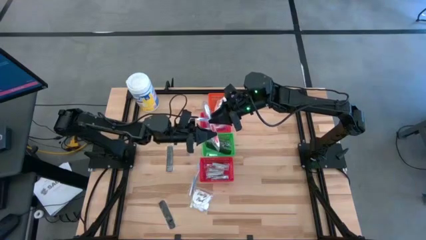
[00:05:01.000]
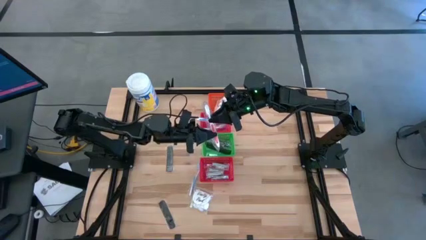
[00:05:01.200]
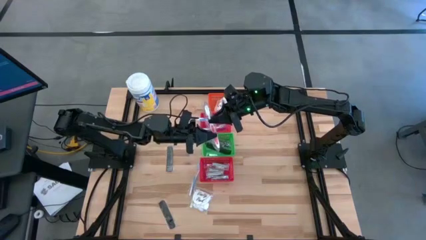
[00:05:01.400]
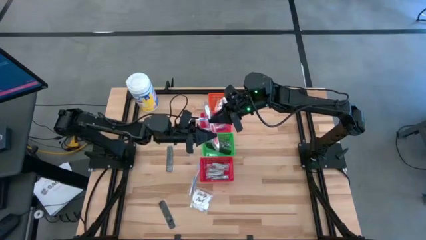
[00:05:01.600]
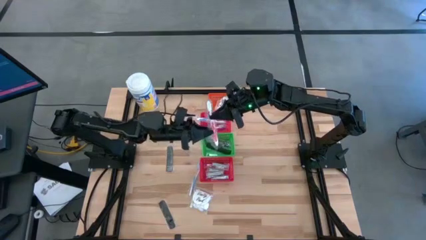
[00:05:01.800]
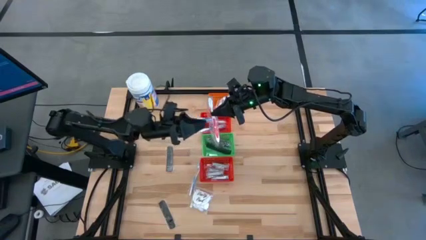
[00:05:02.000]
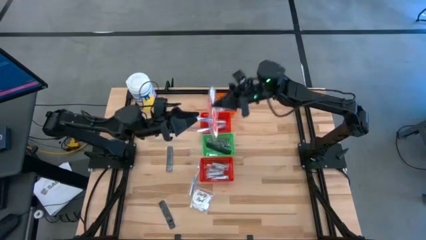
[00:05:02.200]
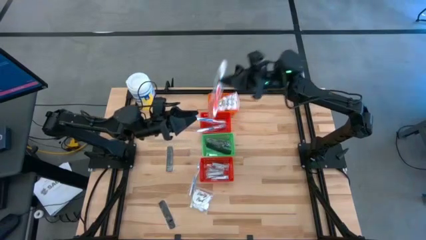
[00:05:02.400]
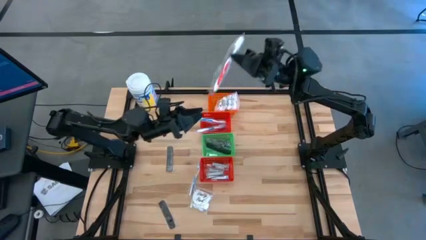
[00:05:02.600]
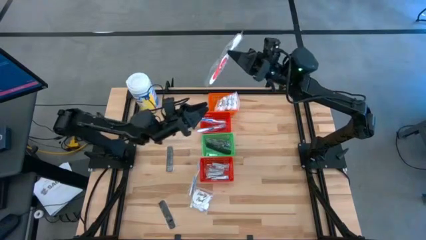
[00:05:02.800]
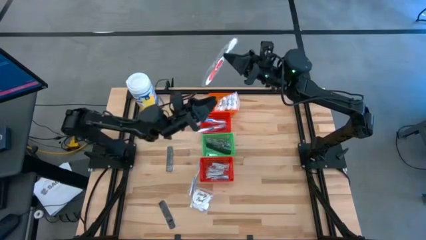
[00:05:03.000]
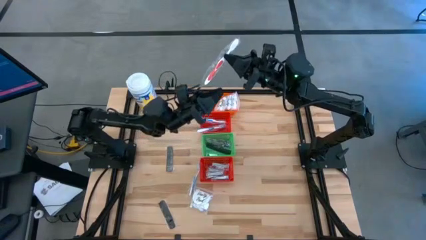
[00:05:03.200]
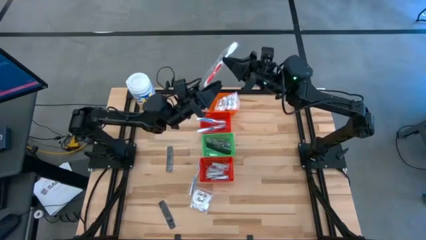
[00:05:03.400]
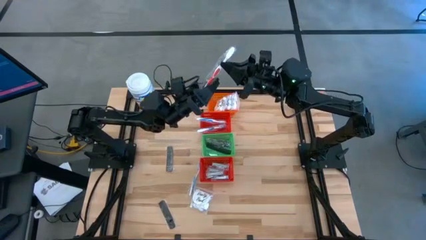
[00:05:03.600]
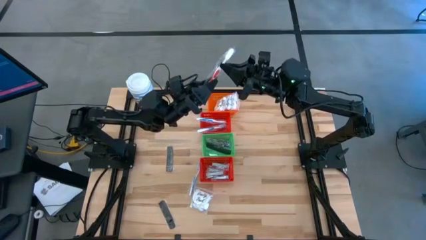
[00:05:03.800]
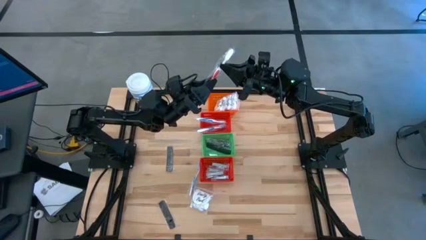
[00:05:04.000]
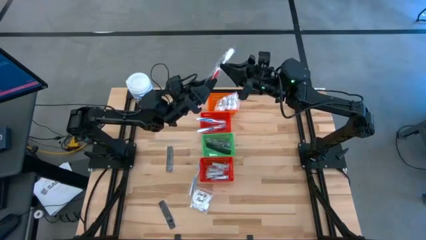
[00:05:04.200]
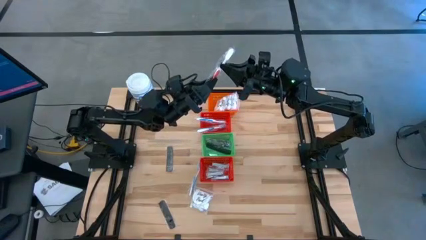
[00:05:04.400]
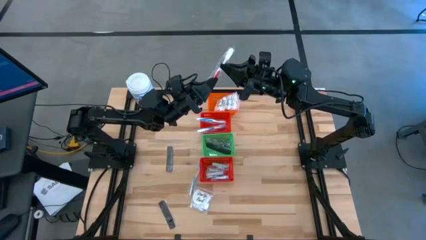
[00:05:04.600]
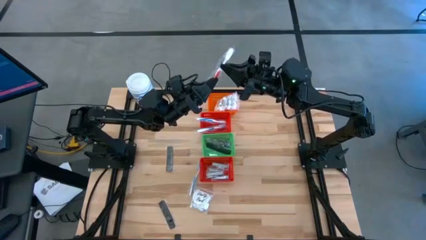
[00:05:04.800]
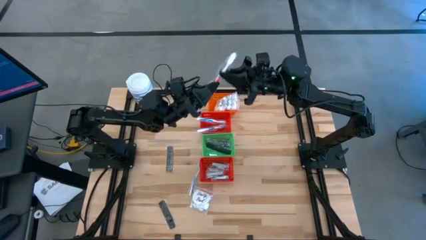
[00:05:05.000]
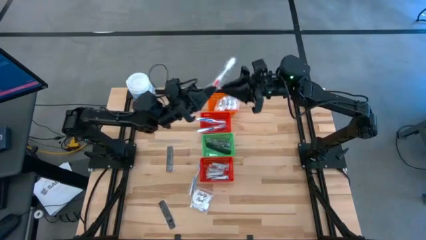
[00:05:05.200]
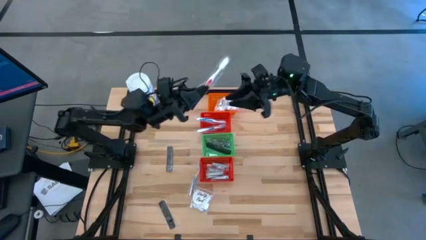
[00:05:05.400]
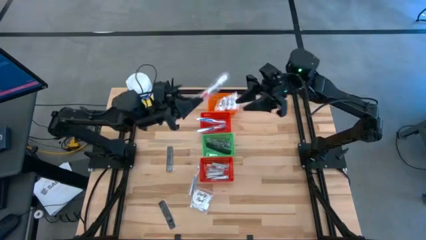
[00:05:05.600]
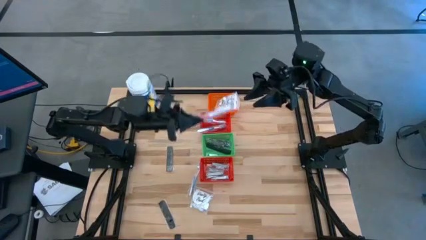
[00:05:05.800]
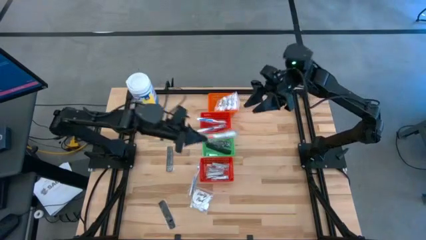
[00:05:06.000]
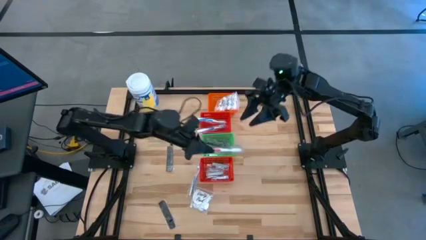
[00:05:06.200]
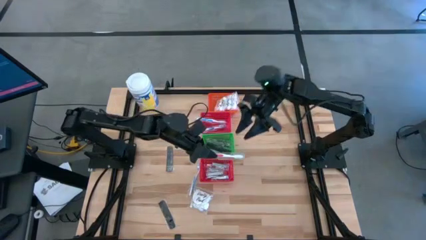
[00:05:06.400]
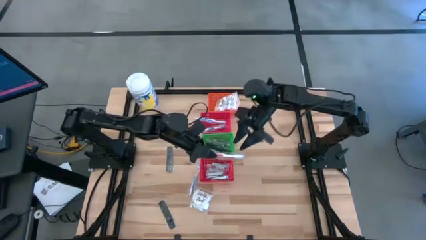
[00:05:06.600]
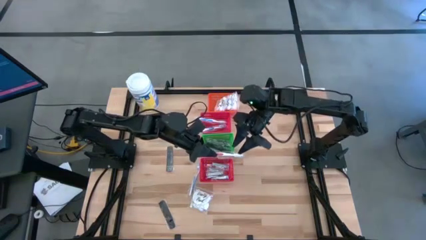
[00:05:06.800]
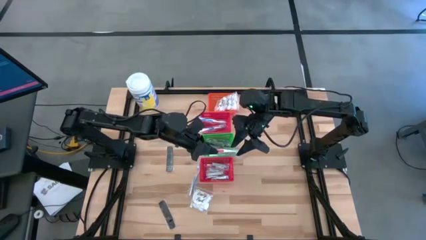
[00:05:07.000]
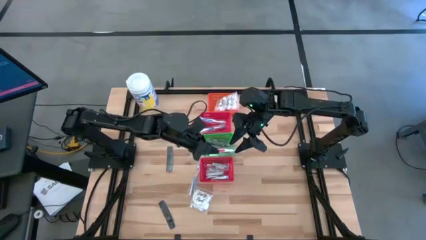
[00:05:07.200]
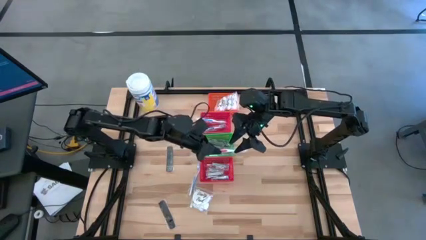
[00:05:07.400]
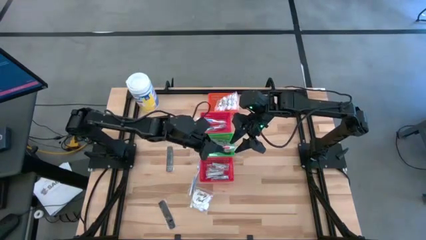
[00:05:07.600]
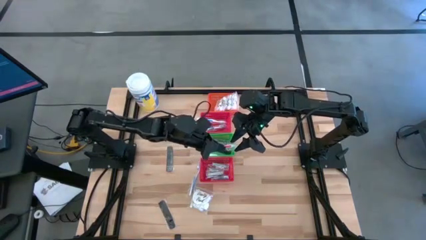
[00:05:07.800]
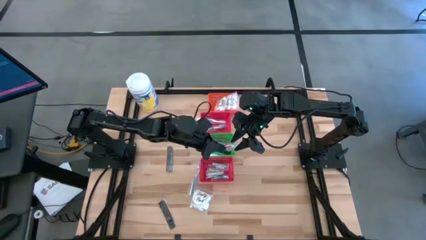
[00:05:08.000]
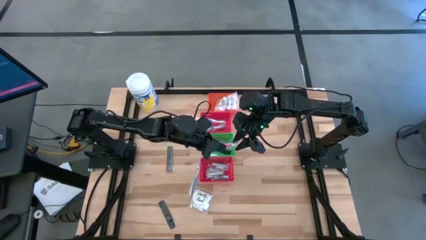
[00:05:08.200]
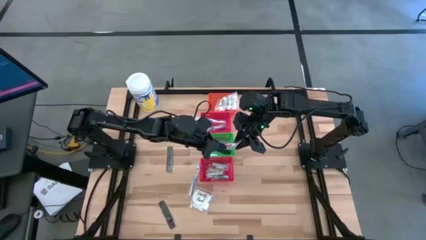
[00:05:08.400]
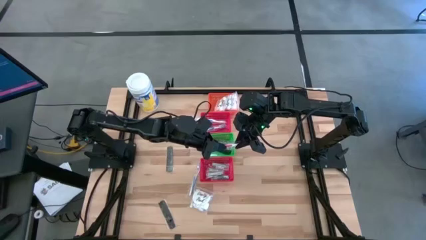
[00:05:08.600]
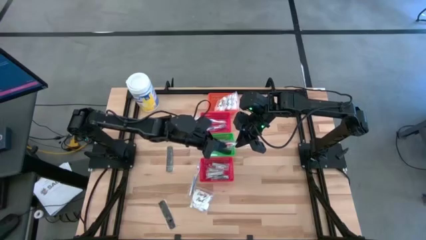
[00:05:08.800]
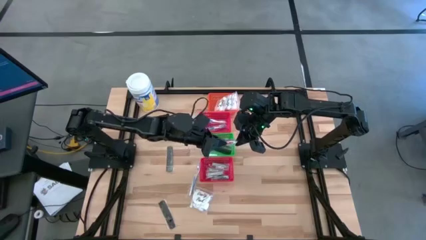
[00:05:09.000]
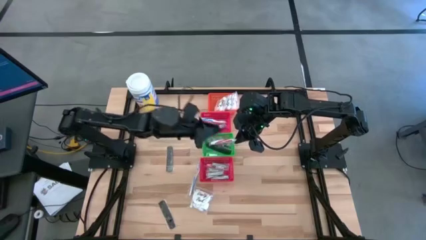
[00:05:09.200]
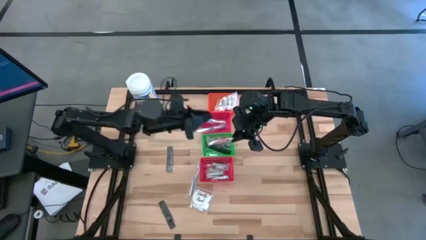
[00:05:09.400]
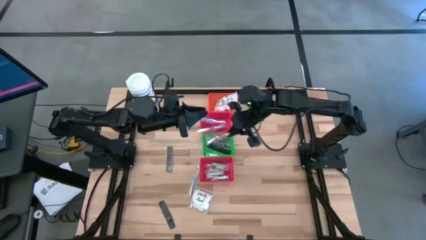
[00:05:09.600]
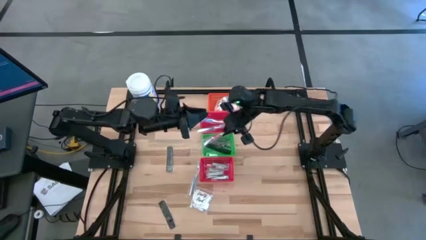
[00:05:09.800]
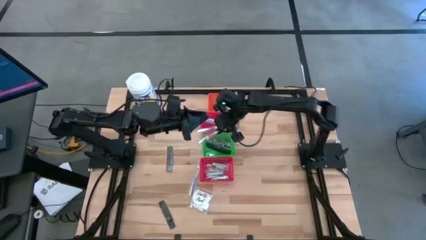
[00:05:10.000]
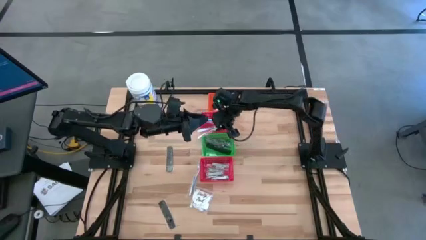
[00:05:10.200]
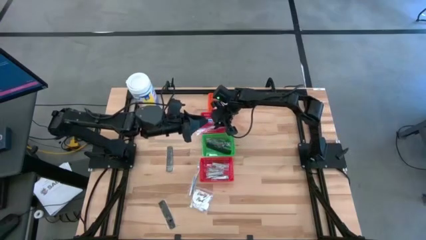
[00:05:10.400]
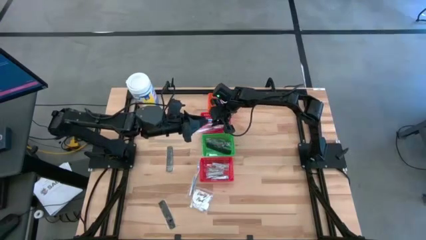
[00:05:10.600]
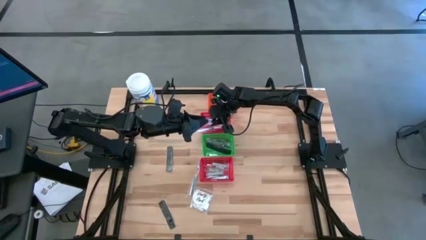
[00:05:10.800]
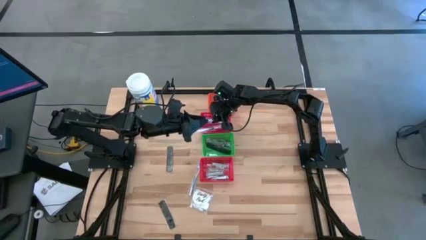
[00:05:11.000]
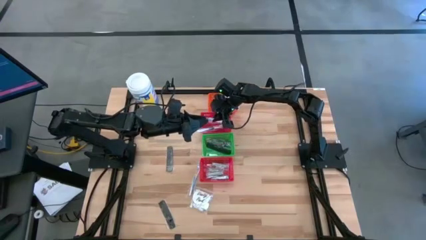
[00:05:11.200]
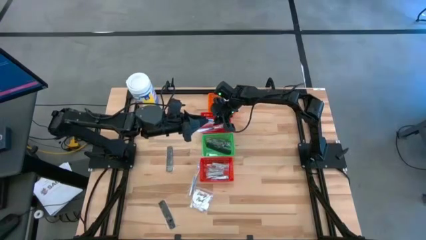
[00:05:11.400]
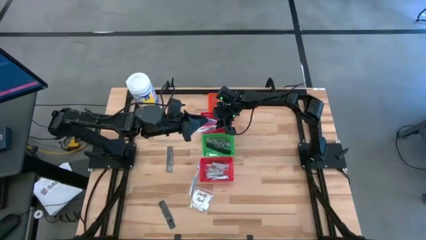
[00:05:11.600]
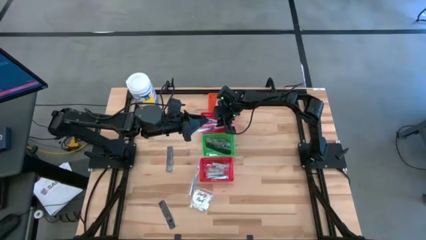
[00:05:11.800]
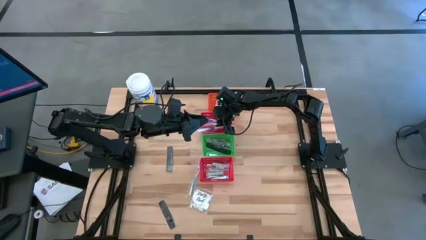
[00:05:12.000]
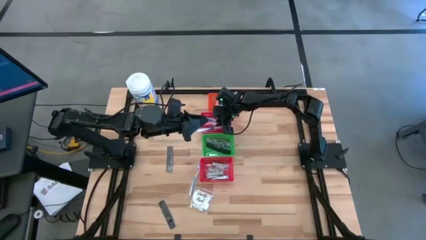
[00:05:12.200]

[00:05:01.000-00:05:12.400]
Task: Pick & Place Travel size toiletries
Put the orange toothbrush into the top red basket
